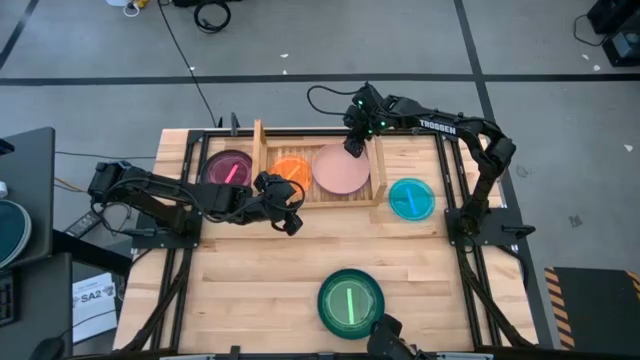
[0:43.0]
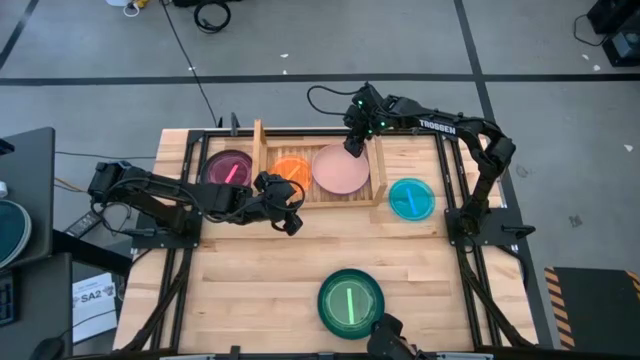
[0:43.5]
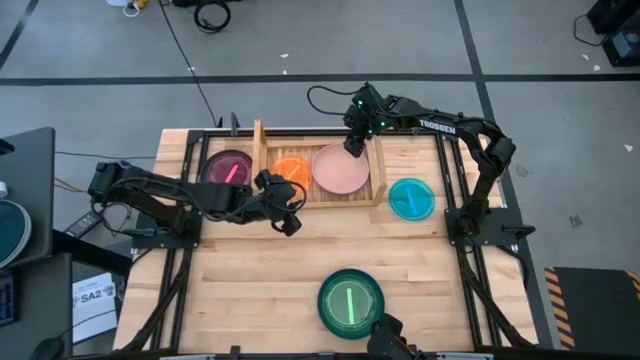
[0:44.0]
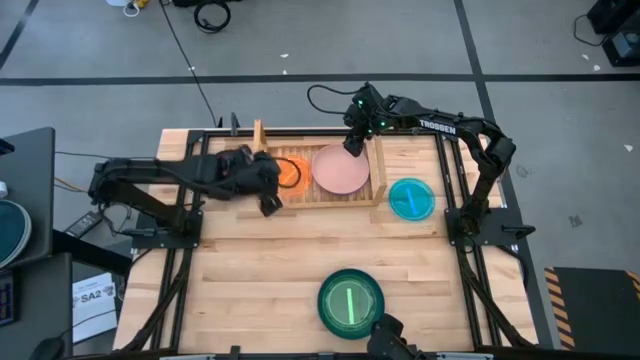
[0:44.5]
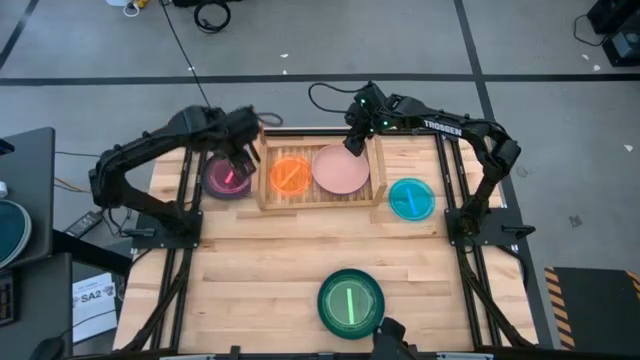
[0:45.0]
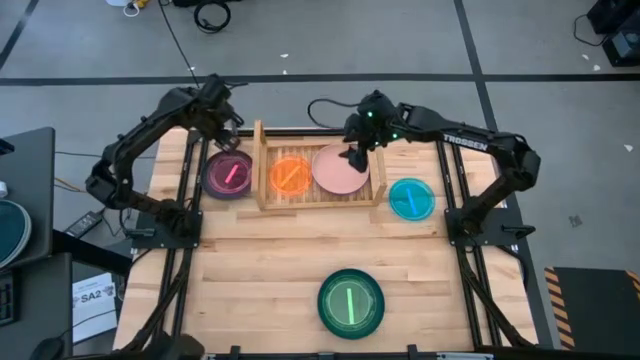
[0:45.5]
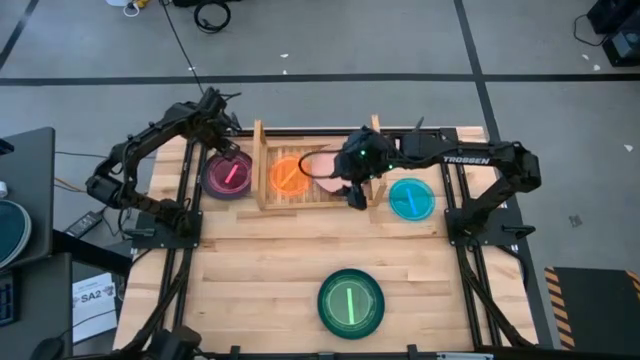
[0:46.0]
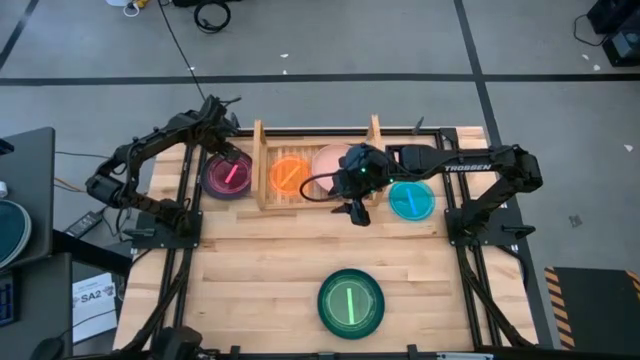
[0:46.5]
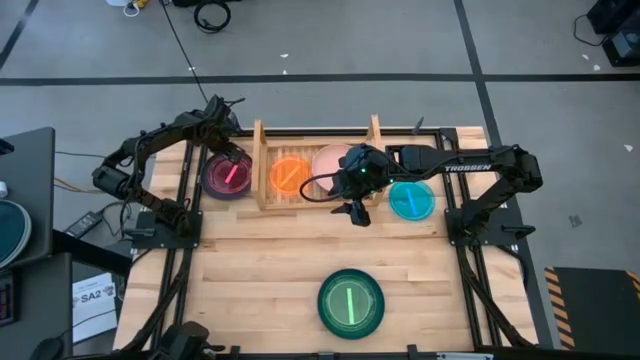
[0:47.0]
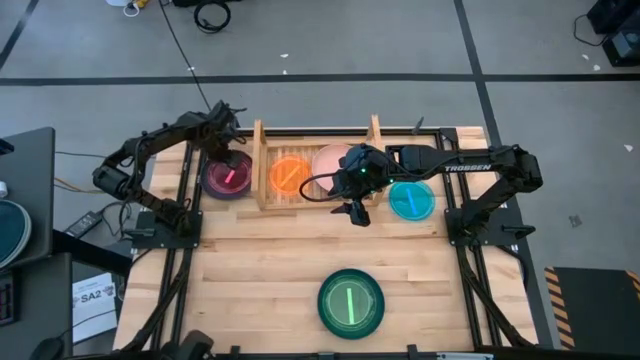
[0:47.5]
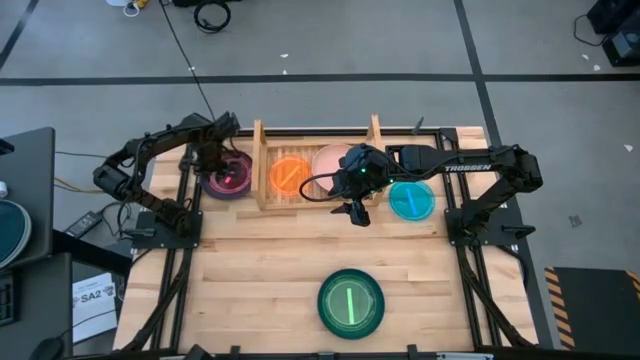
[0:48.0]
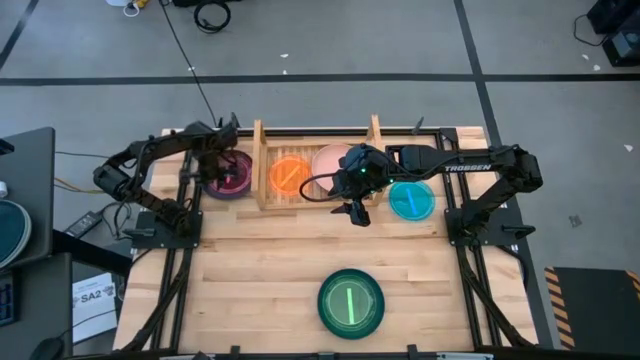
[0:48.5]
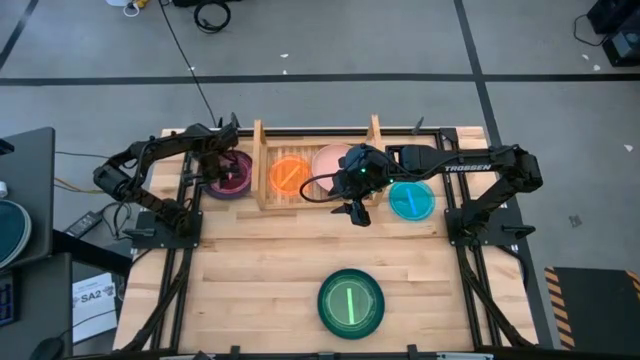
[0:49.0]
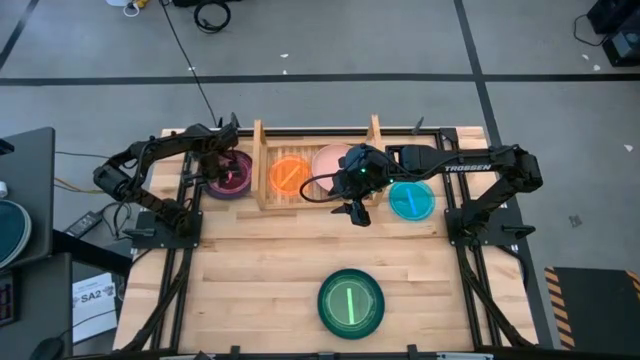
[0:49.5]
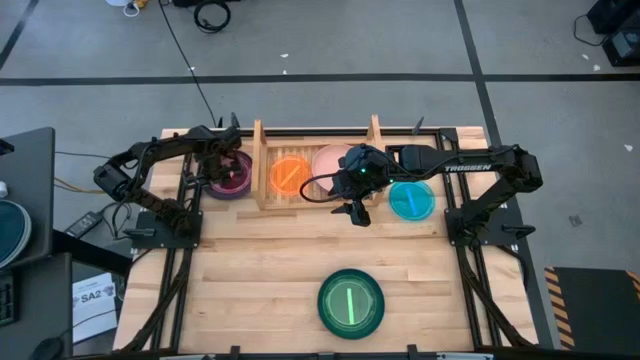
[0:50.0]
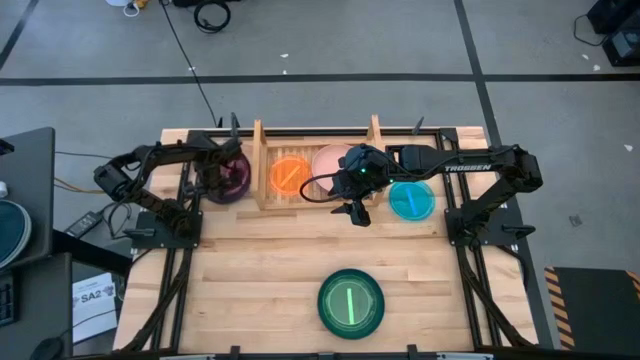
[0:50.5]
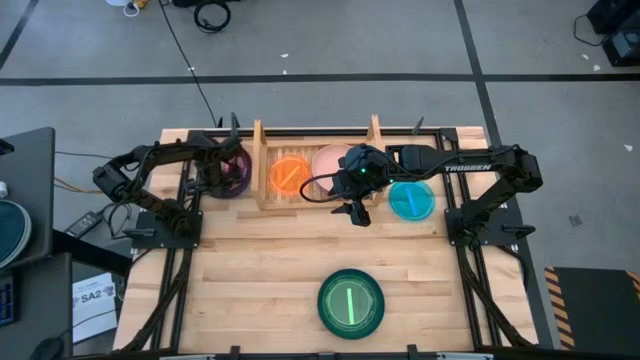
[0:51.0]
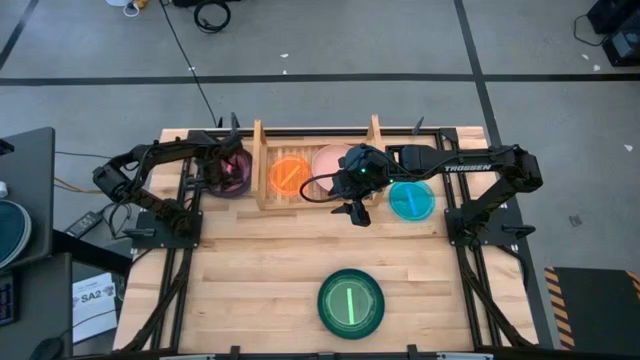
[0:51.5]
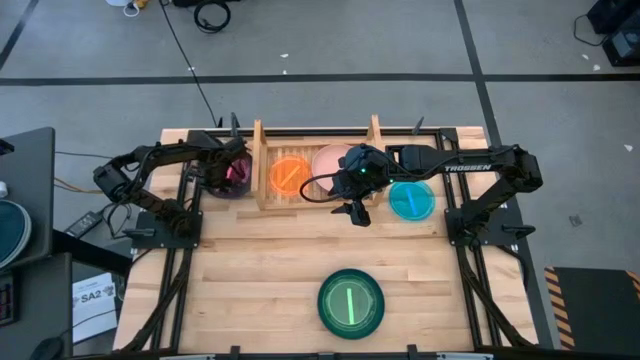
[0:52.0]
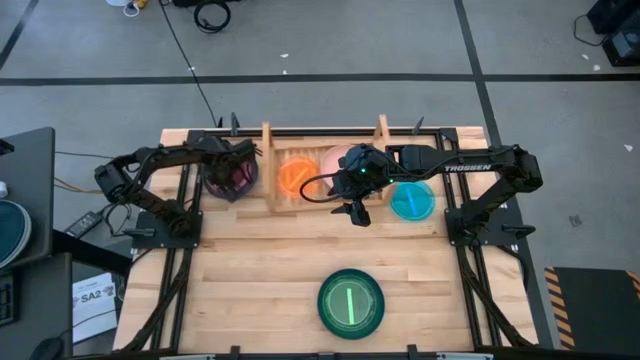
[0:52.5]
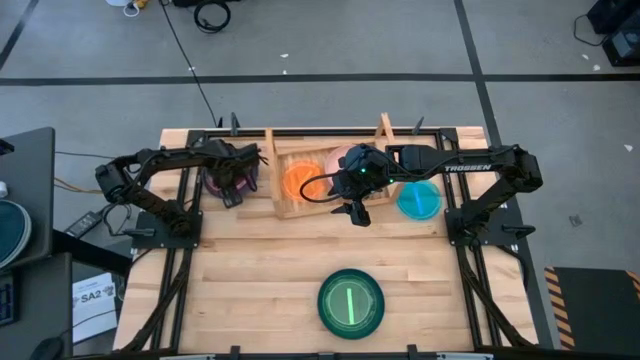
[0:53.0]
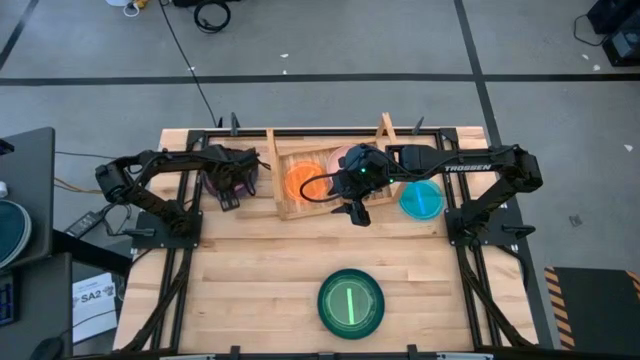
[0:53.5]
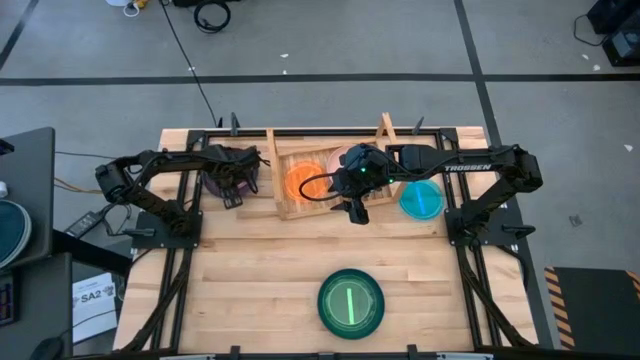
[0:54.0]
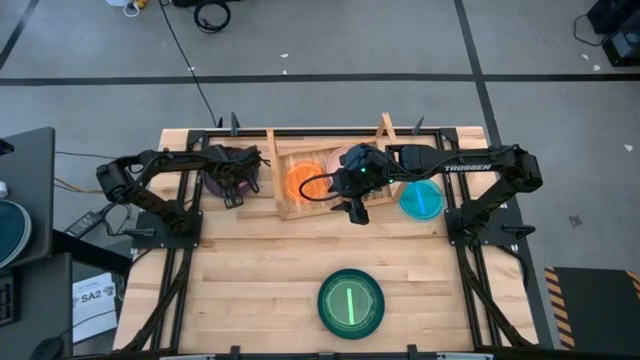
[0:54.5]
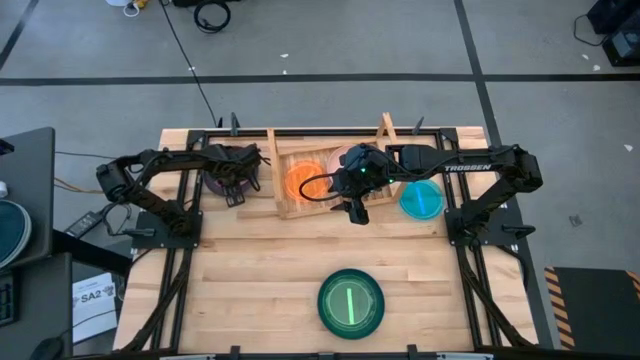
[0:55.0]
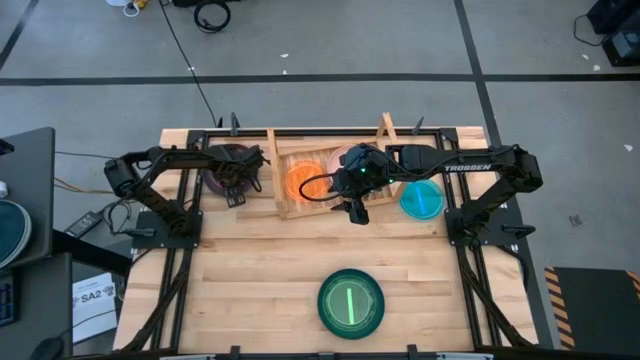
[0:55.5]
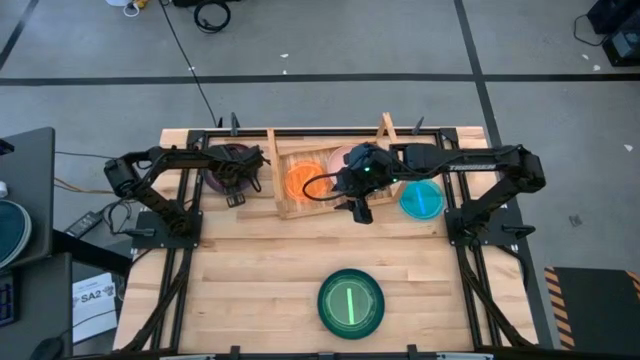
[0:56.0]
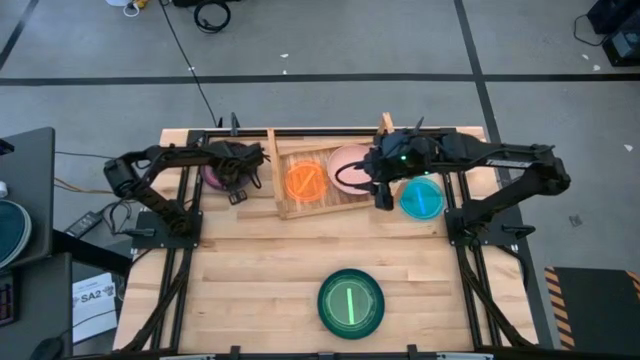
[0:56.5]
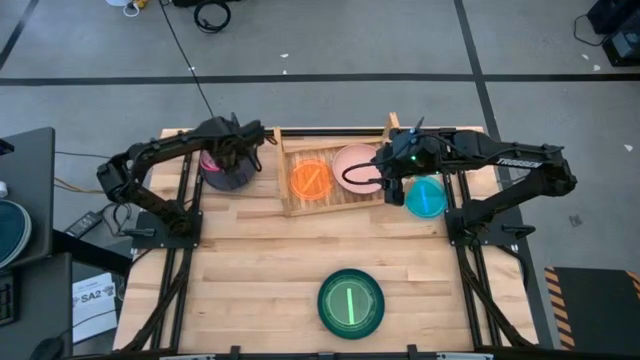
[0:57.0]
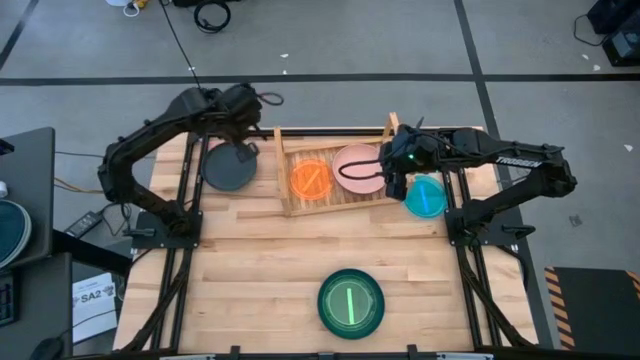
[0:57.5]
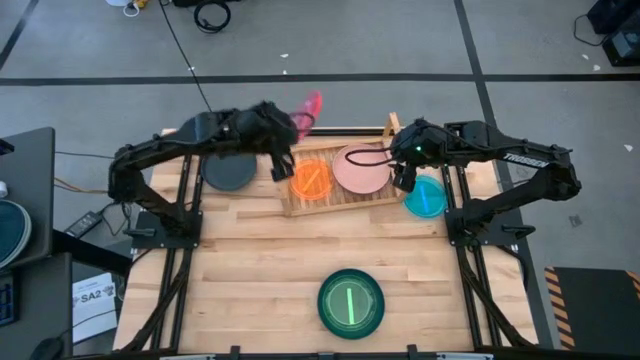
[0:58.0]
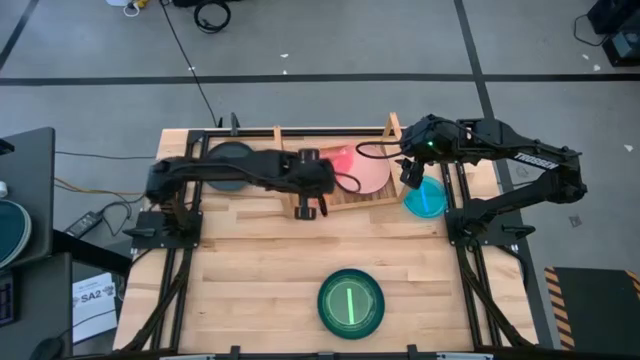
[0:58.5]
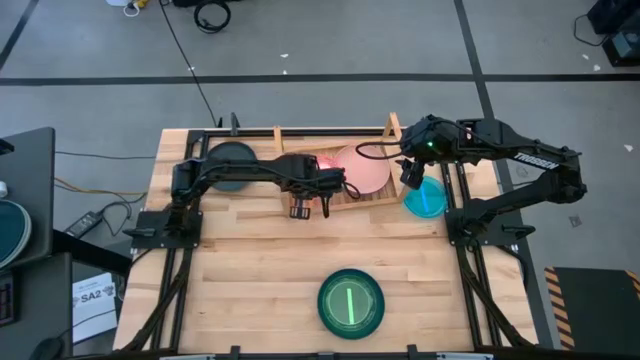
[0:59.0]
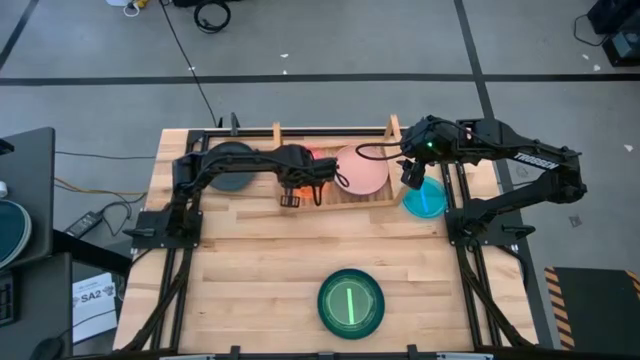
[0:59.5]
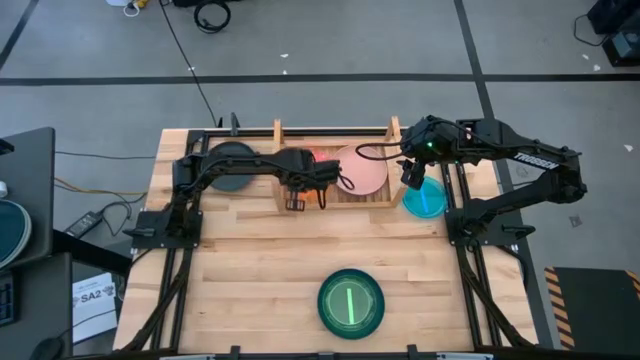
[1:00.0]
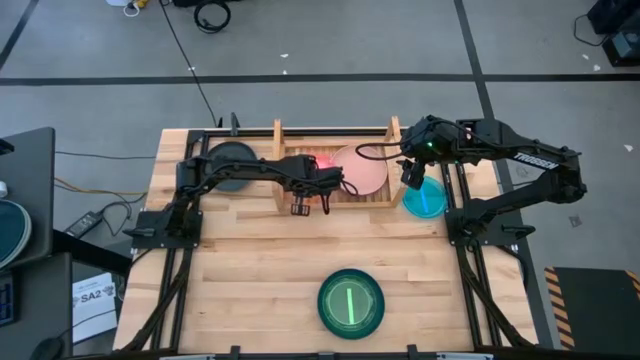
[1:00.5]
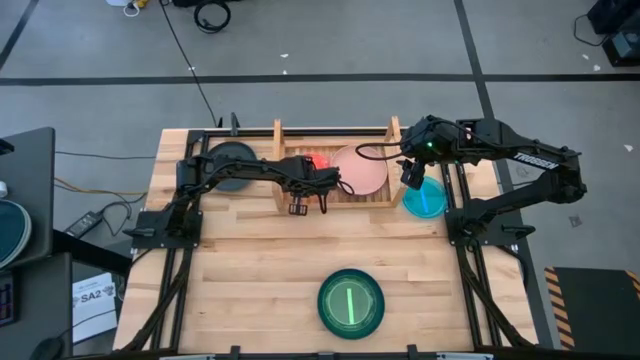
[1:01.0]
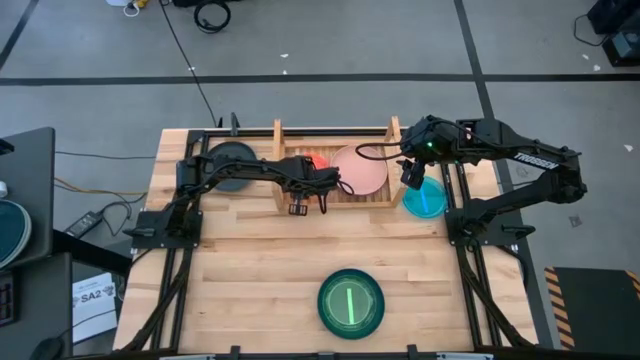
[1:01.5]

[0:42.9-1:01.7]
Task: Place and stack plates onto a shelf
Stack the small pink plate on top of the small orange plate on the shelf

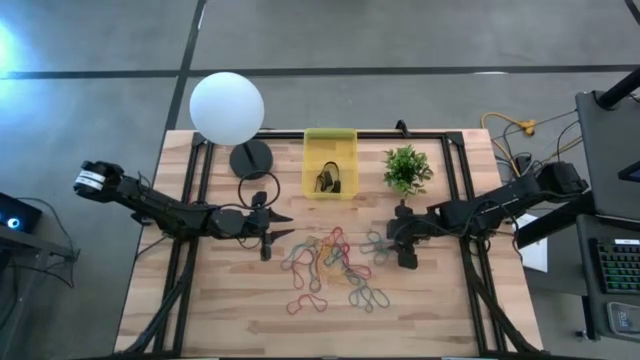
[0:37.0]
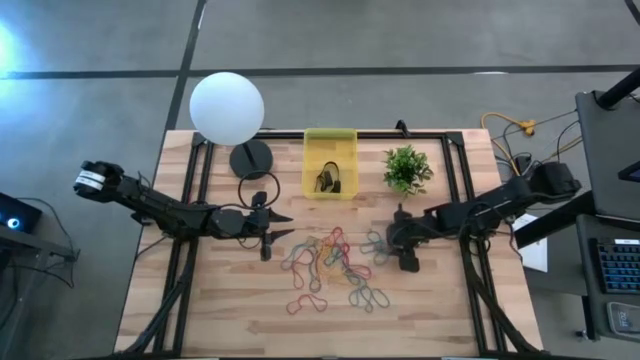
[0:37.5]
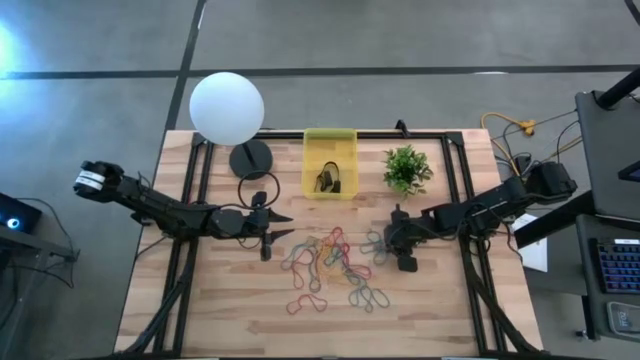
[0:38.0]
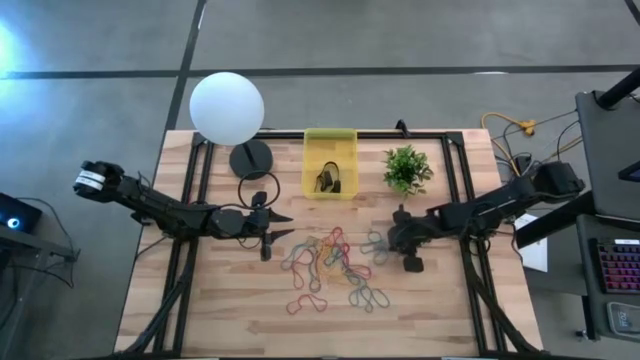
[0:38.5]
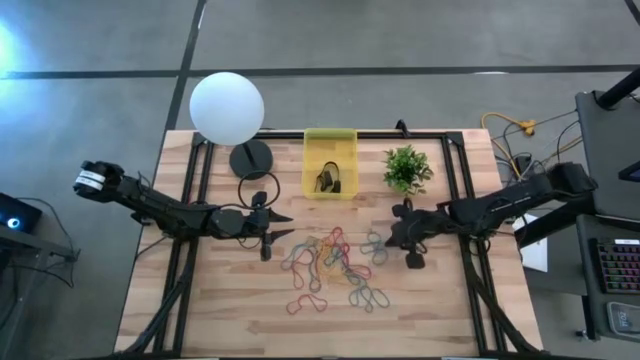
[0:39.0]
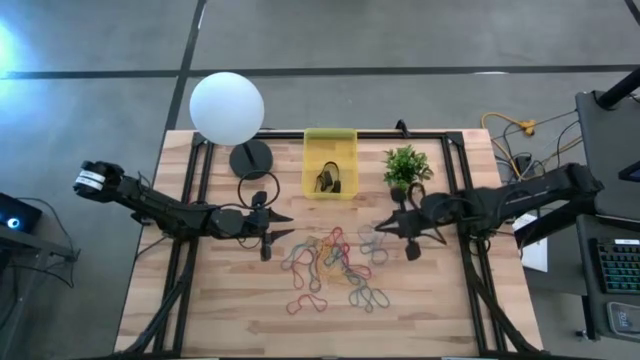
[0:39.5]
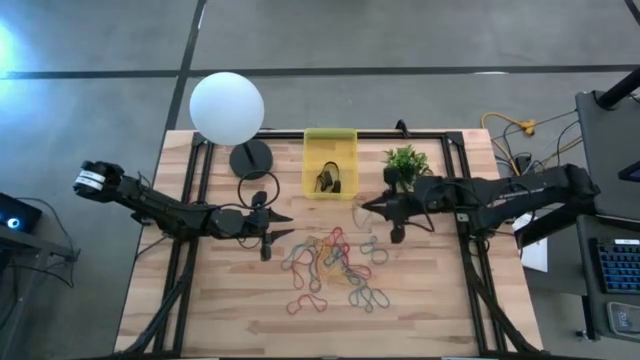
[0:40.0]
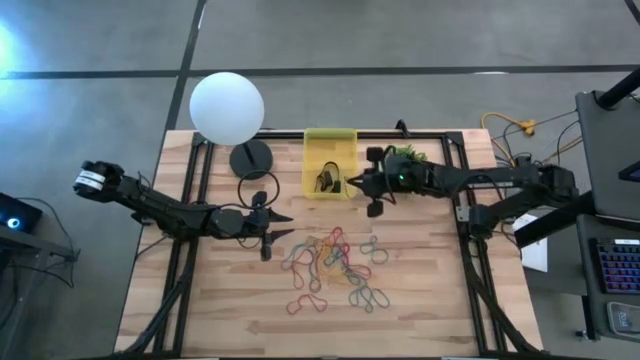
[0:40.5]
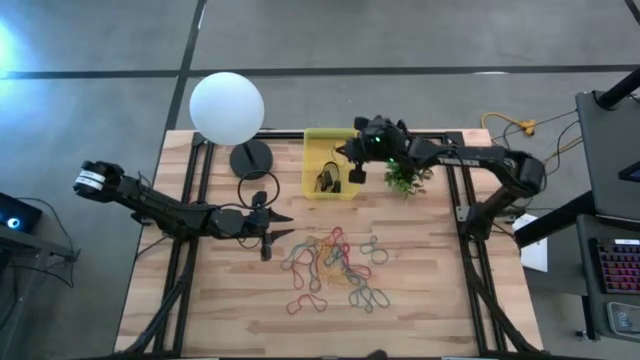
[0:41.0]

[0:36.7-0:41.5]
Task: Pick and place rubber bands into bin
Put the blue rubber band into the yellow bin
